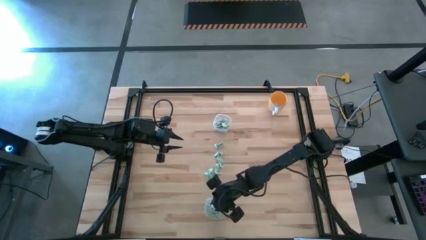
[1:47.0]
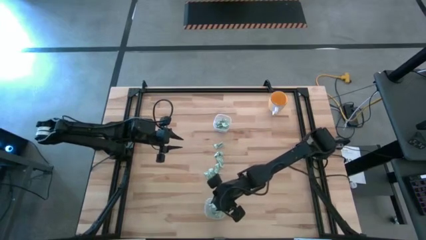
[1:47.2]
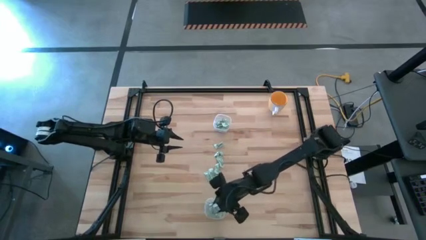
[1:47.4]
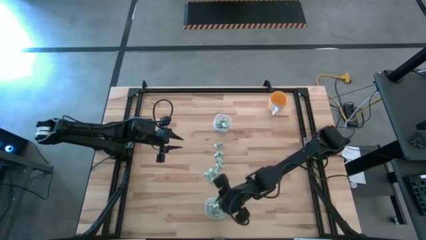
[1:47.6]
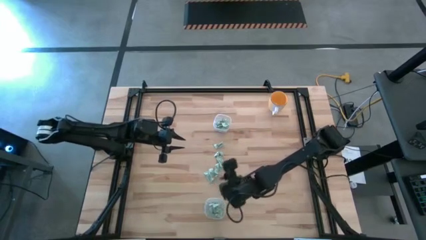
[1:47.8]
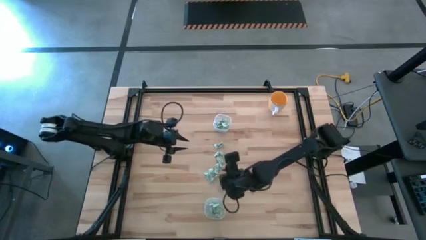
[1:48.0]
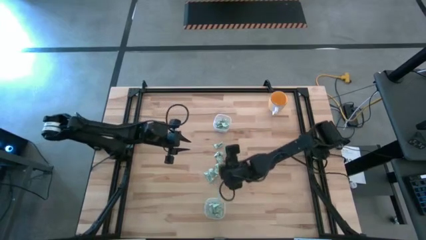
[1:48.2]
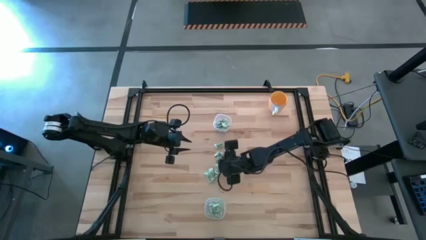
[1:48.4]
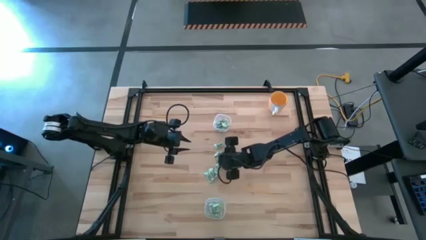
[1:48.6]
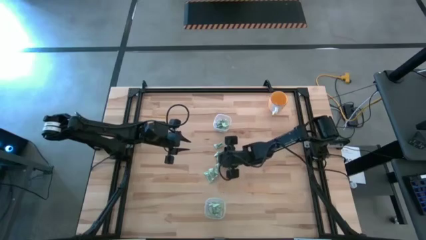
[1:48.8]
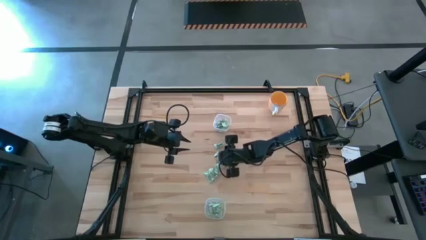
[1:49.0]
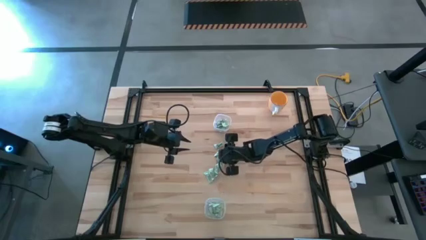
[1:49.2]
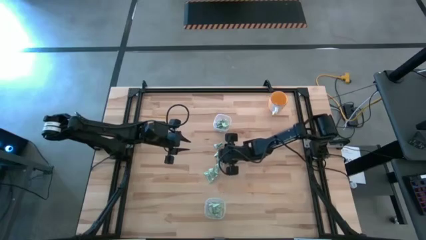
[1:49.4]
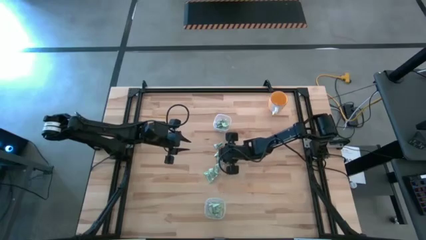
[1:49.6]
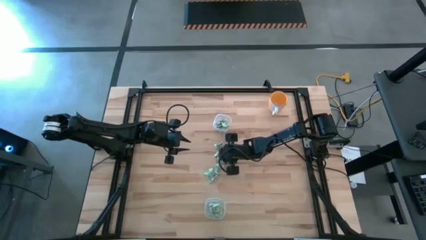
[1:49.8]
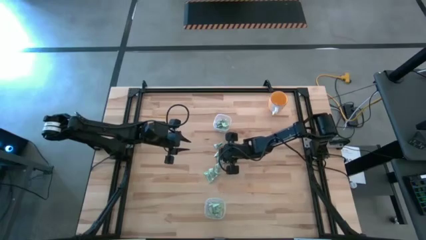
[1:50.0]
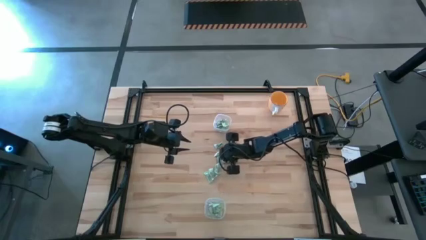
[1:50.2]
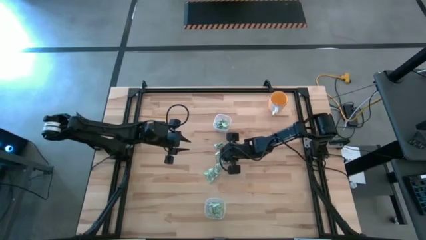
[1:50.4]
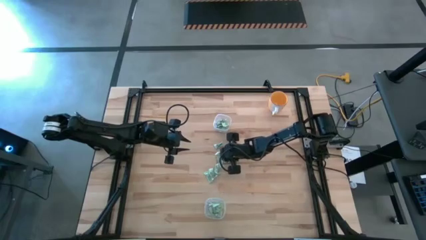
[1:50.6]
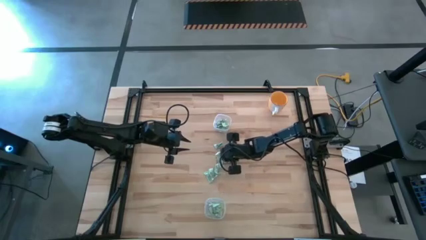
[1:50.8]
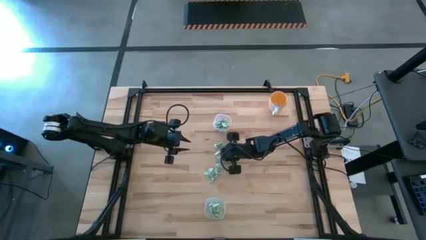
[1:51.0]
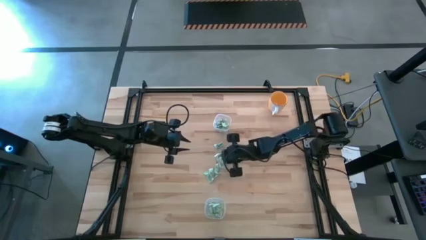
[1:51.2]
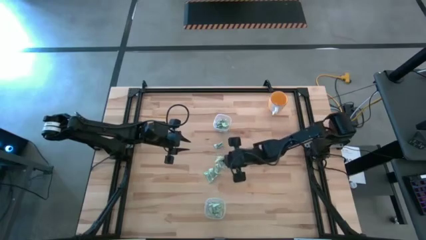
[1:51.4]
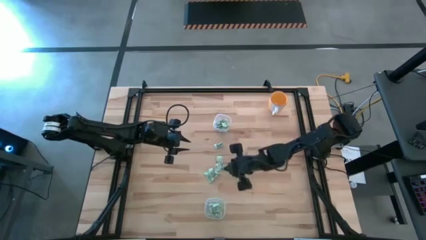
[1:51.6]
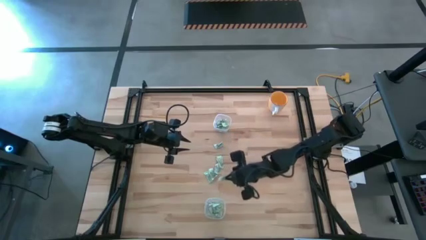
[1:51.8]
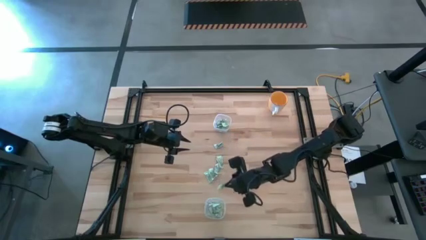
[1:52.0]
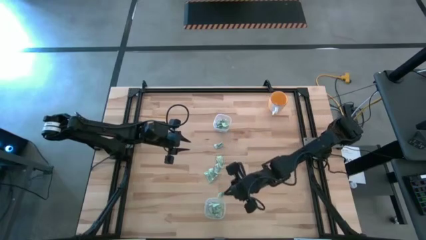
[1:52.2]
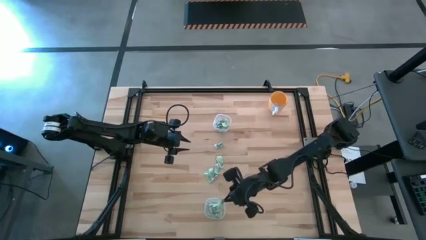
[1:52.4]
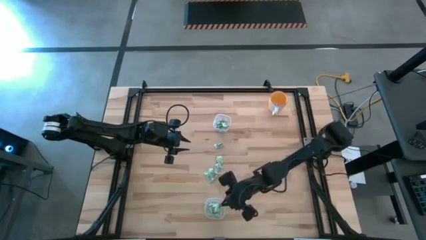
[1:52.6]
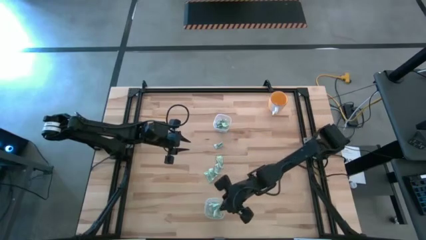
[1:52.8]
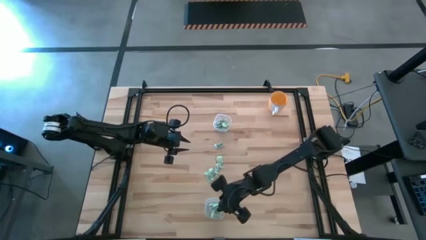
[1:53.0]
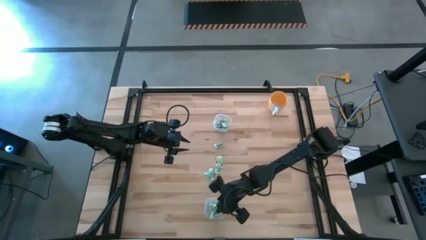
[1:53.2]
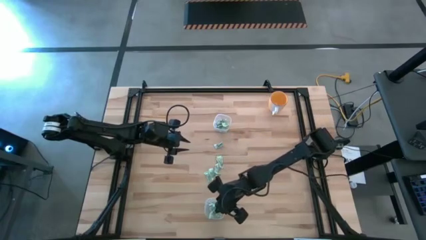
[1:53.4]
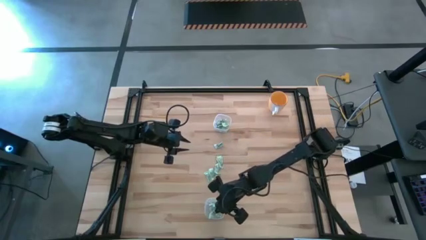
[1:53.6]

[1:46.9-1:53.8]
Task: Pick and place items into bin
Put the stevia packet into the bottom transparent bin

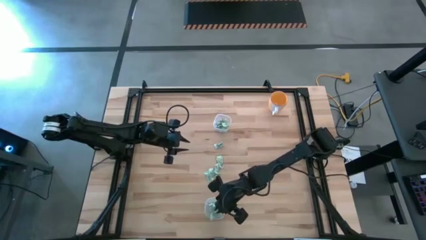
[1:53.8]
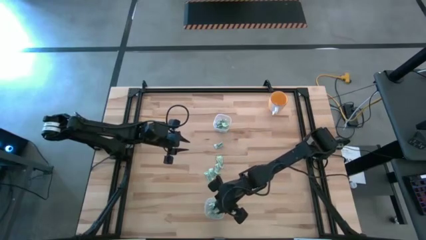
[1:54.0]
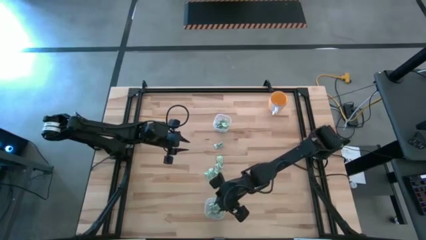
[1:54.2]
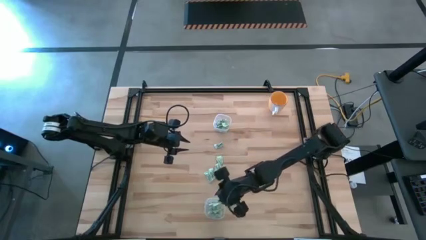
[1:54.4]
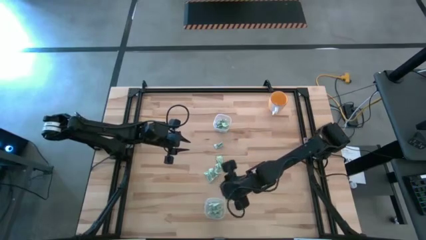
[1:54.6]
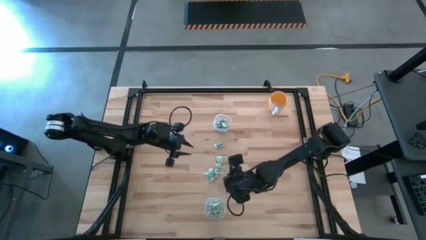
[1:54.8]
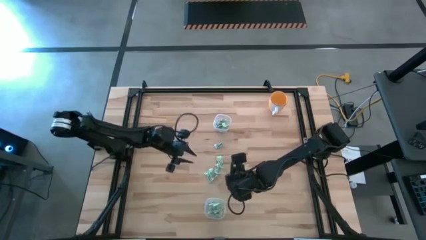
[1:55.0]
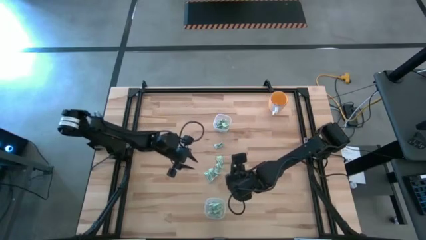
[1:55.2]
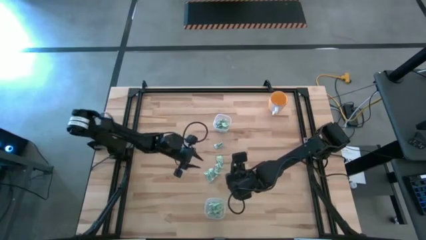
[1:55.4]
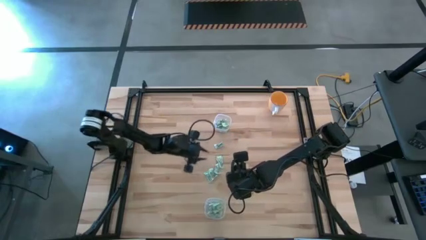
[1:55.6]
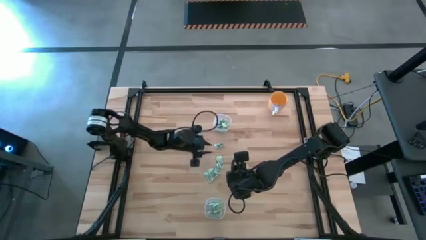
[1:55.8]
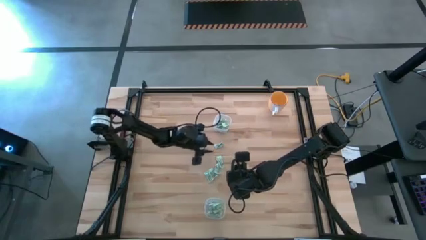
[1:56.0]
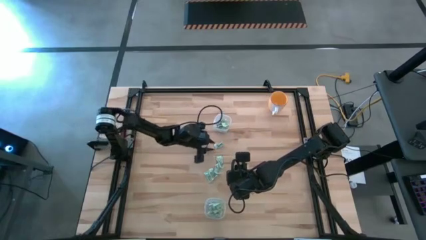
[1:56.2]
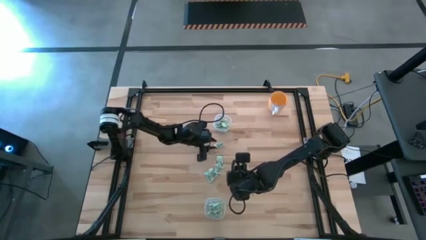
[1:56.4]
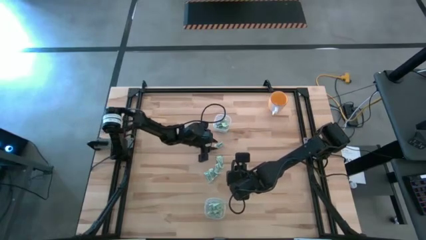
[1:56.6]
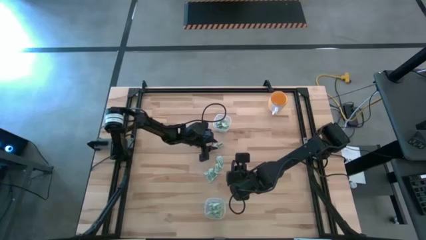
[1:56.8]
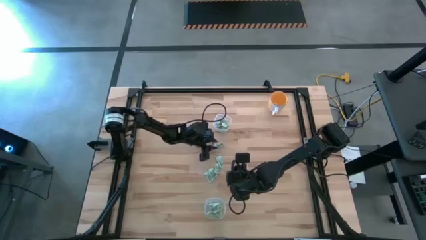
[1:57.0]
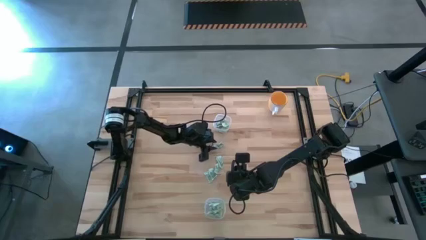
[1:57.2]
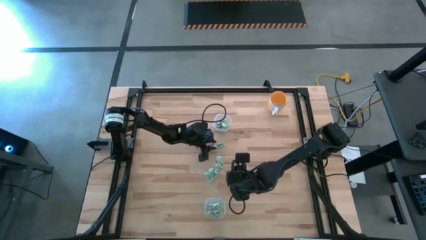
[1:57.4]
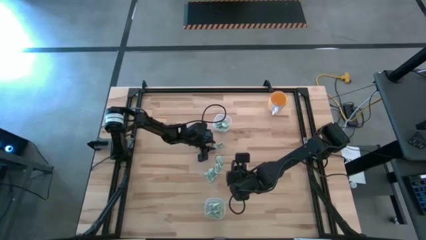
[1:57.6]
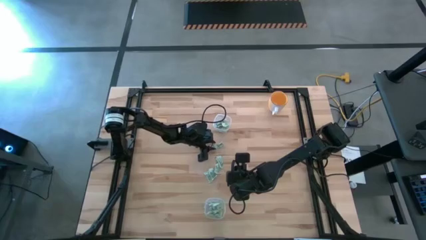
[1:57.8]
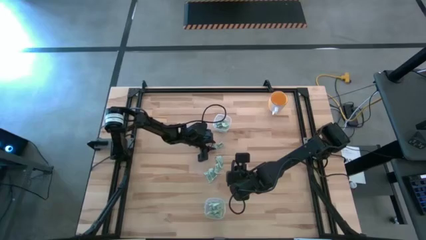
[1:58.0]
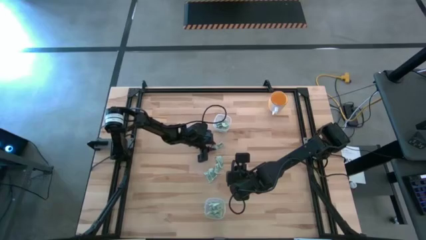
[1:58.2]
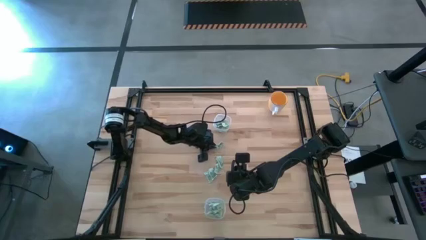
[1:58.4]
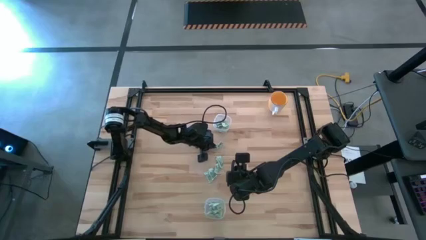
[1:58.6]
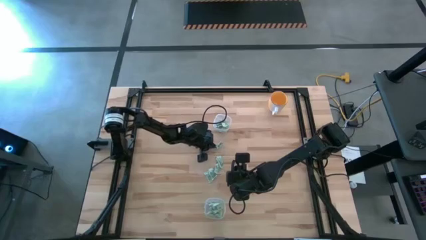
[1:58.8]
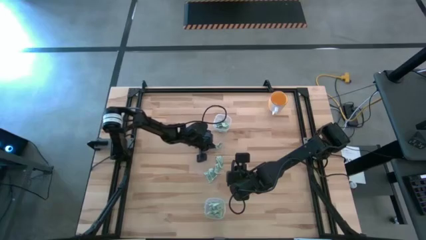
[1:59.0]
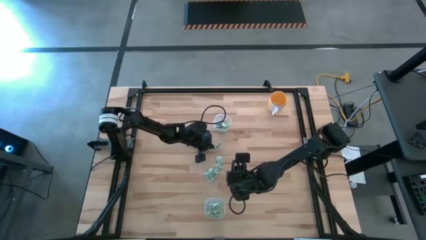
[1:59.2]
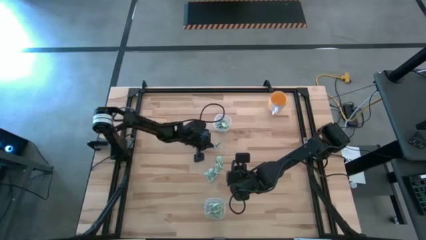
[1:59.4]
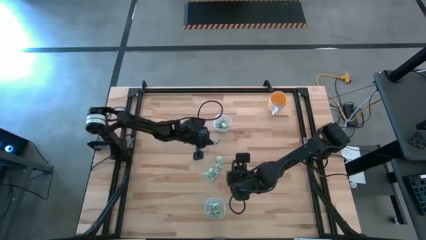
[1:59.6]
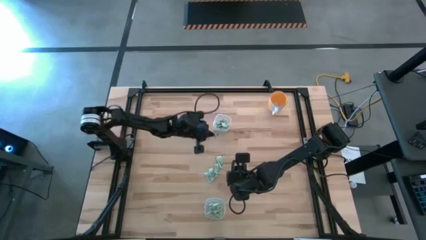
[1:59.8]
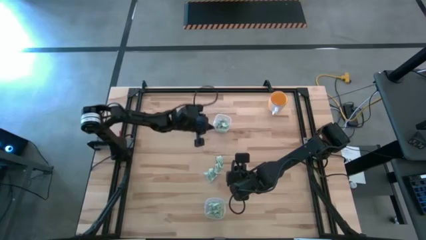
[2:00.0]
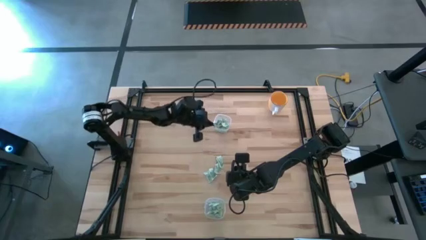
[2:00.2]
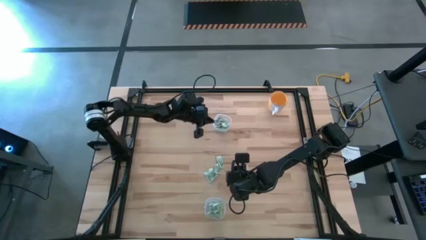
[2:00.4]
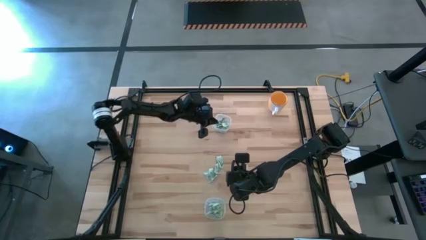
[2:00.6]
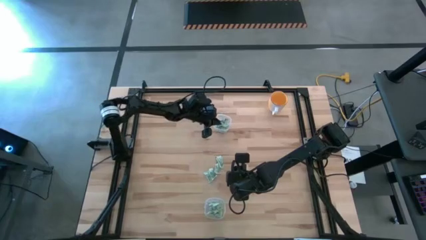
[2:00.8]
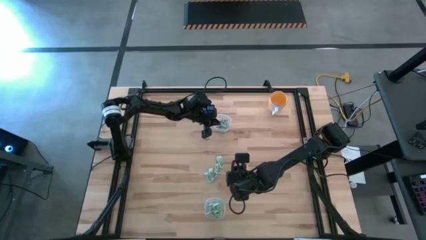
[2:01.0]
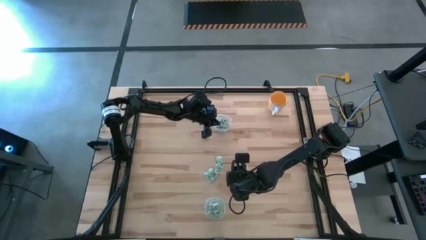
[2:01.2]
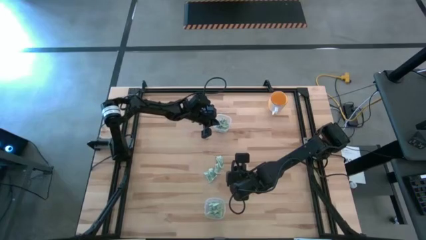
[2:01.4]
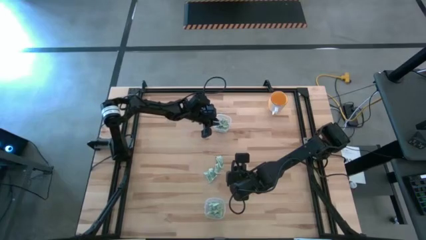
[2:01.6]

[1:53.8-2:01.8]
Put the stevia packet into the top transparent bin

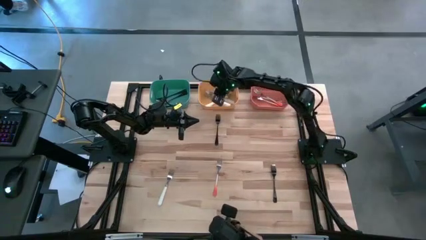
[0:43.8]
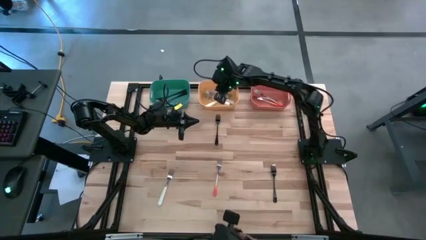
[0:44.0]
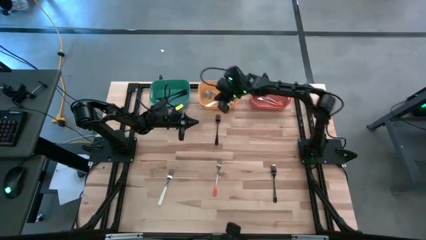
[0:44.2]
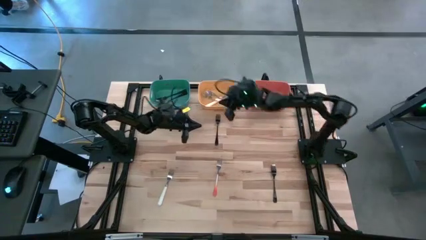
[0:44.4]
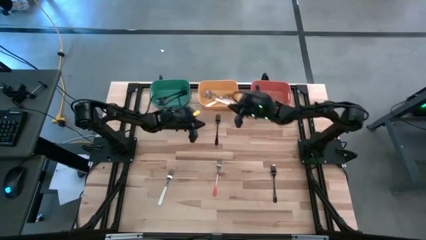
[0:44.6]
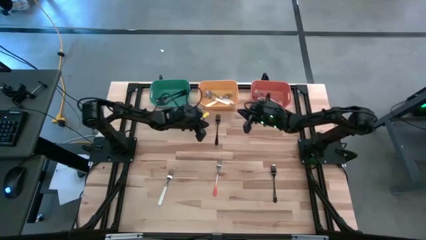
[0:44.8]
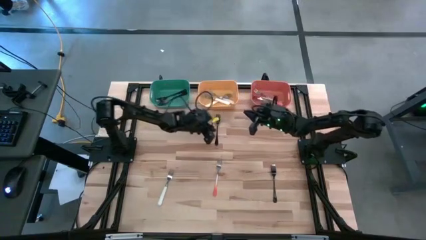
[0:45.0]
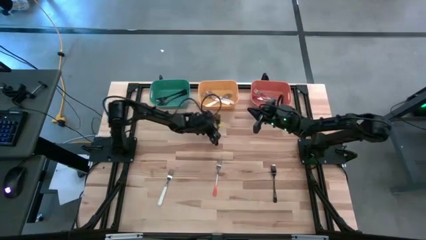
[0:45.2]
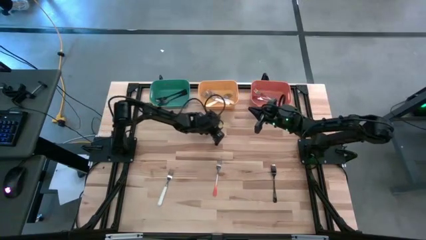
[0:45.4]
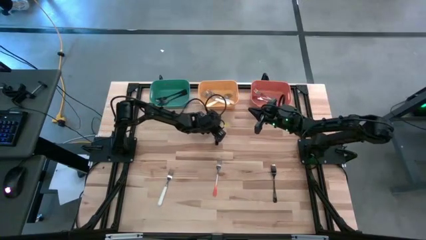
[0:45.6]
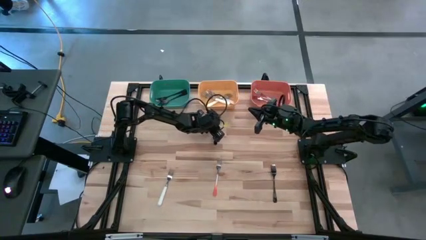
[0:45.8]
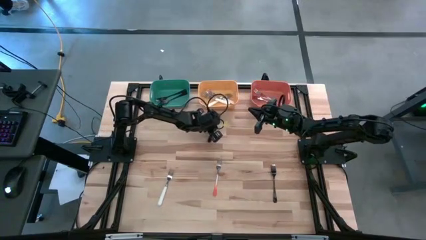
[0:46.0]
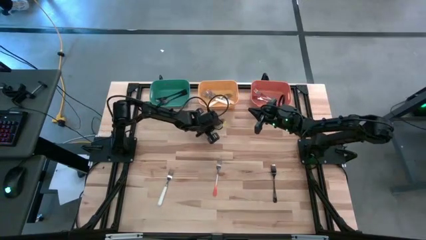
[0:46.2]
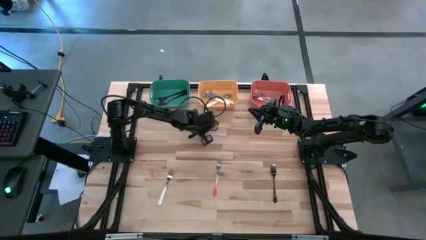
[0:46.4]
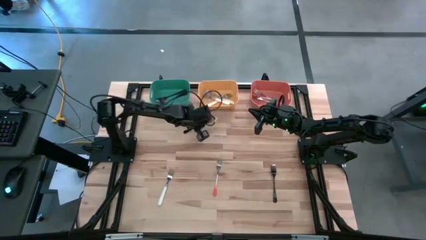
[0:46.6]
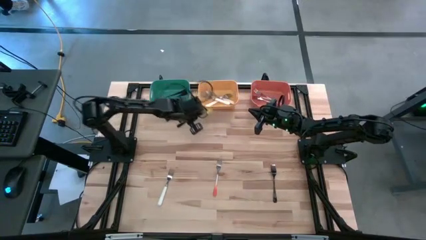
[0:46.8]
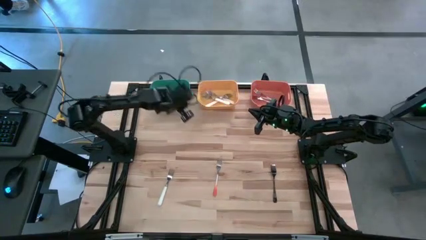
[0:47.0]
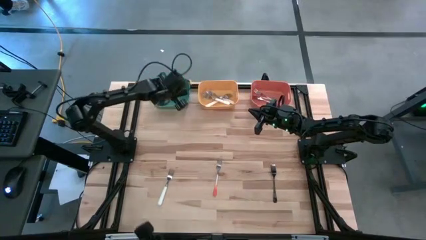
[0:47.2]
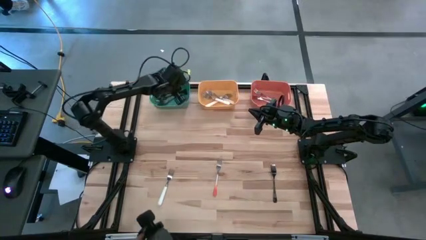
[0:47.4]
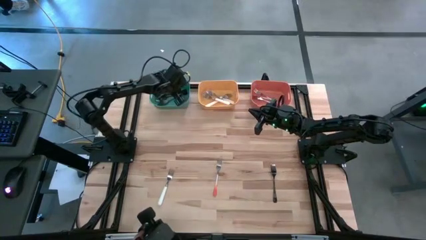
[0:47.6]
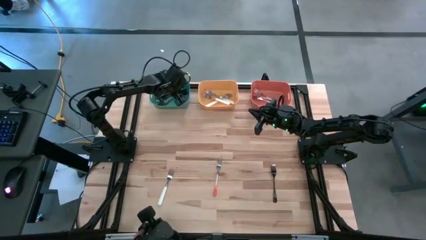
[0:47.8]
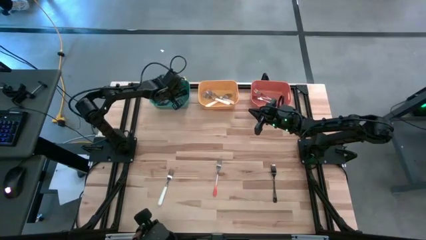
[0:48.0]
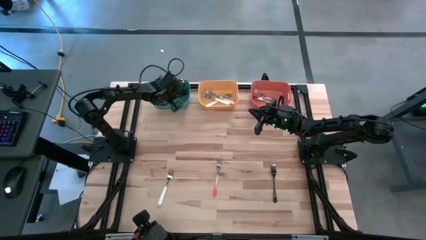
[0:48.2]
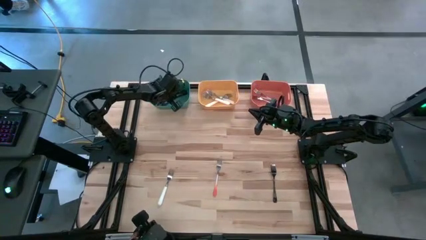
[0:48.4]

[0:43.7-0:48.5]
Task: Sort silverware by color (type)
Put the black fork into the green bin
